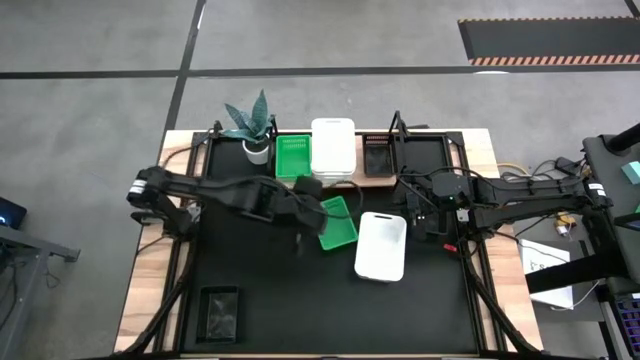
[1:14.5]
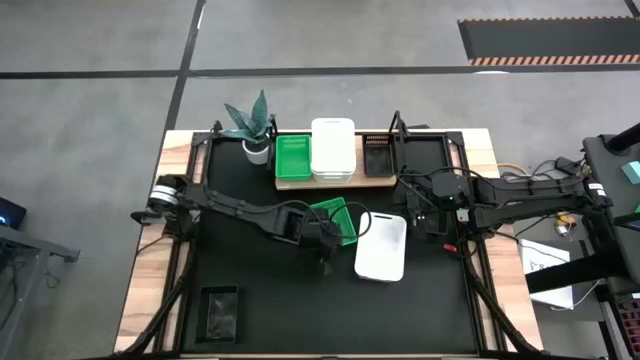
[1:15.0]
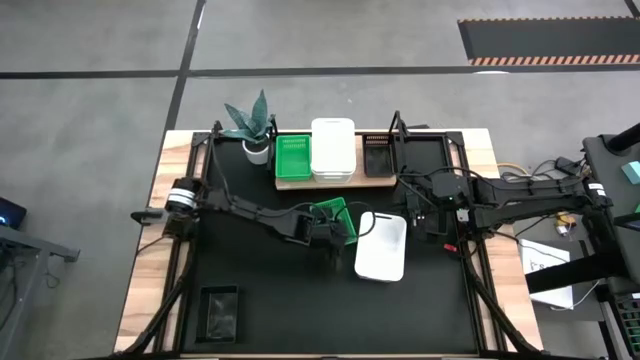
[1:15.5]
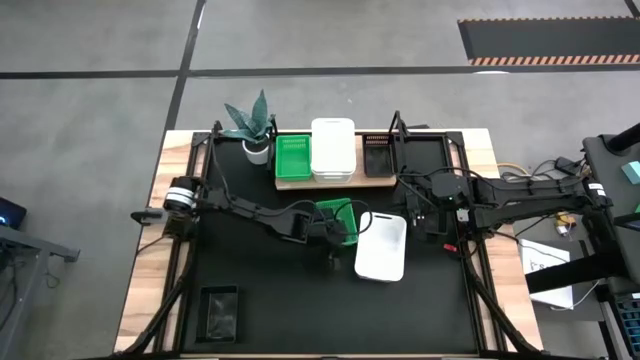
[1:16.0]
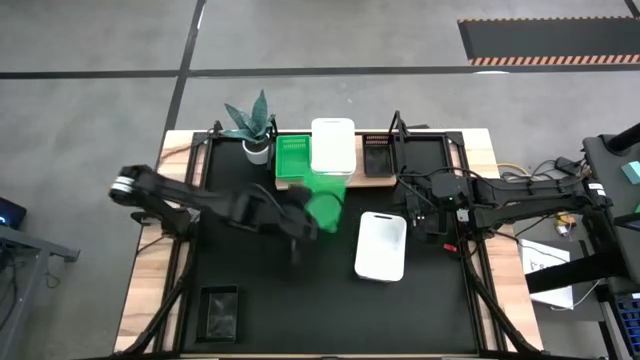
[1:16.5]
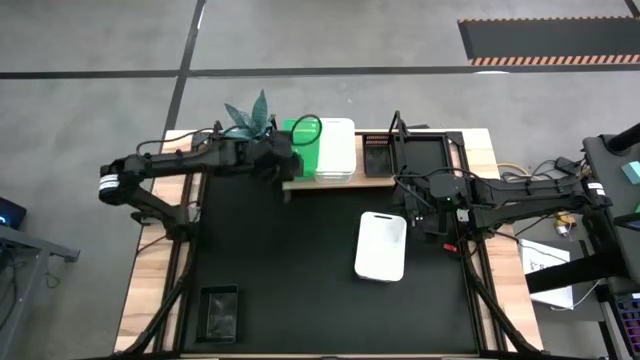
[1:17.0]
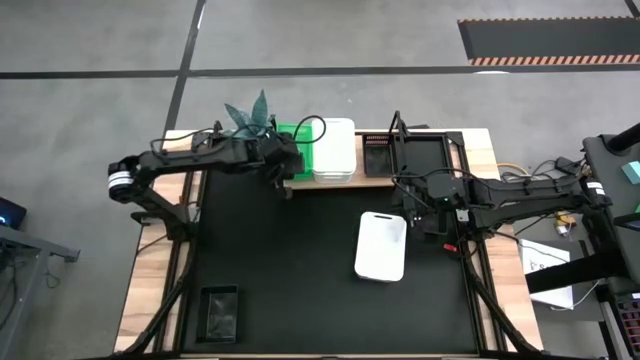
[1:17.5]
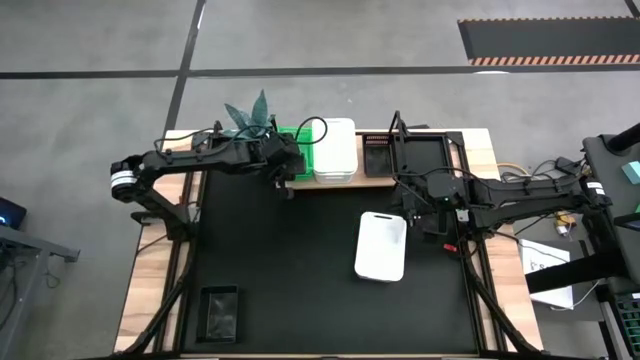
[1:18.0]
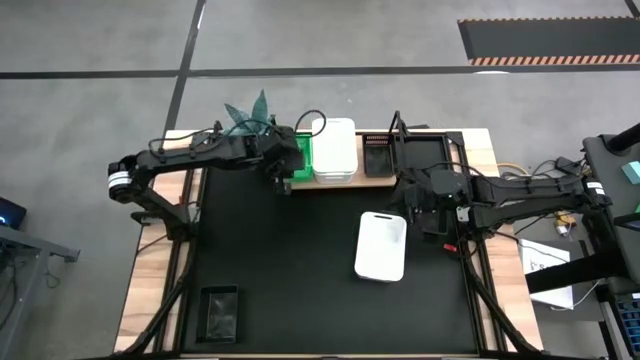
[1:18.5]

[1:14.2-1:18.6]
Task: Stack baskets on shelf by color
Stack the green bin into the green bins on the shelf

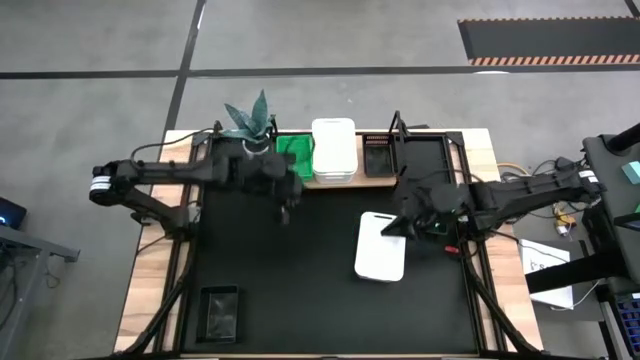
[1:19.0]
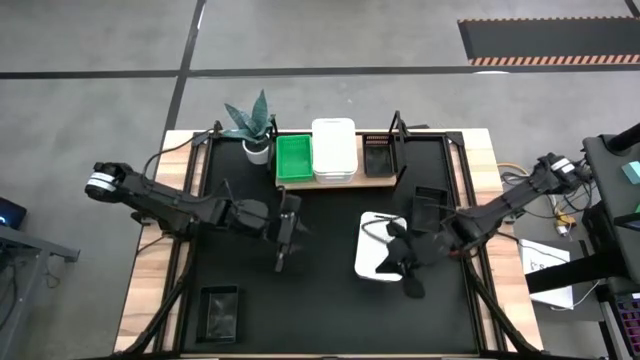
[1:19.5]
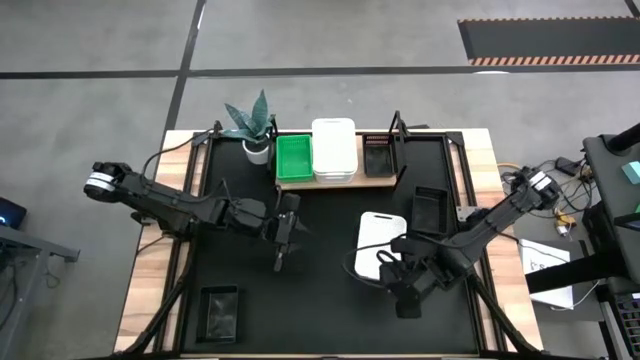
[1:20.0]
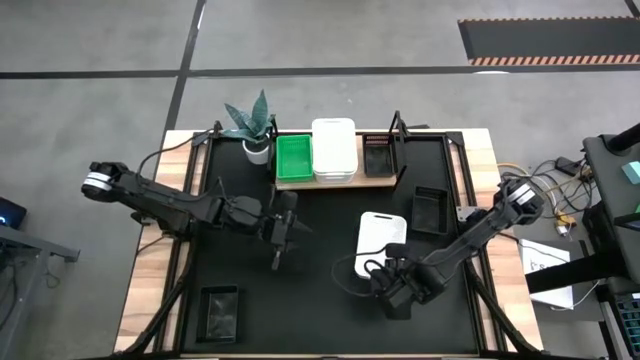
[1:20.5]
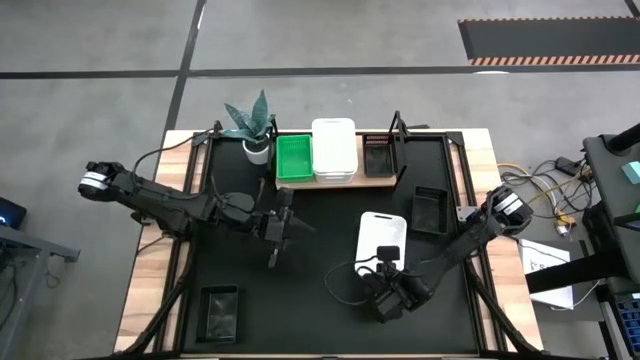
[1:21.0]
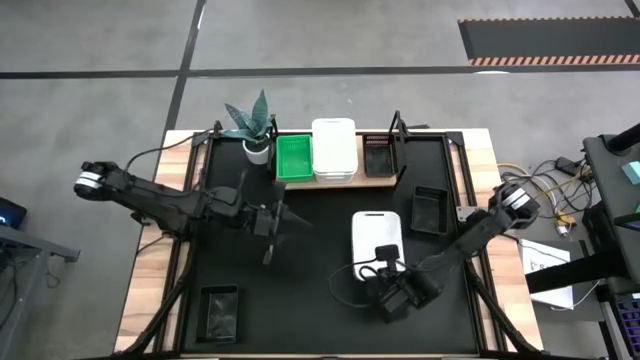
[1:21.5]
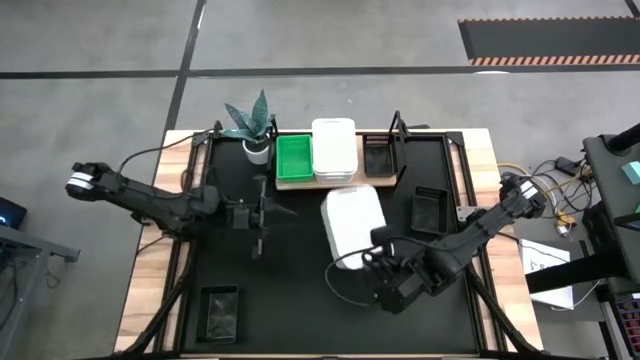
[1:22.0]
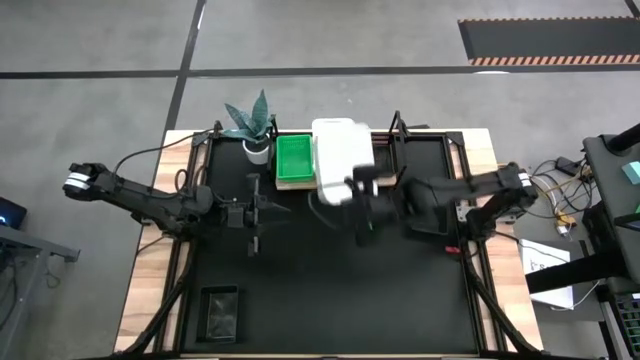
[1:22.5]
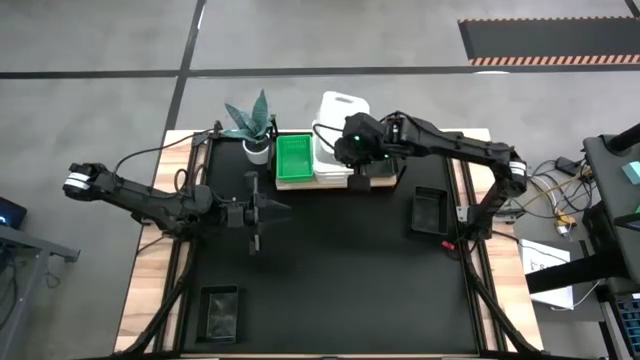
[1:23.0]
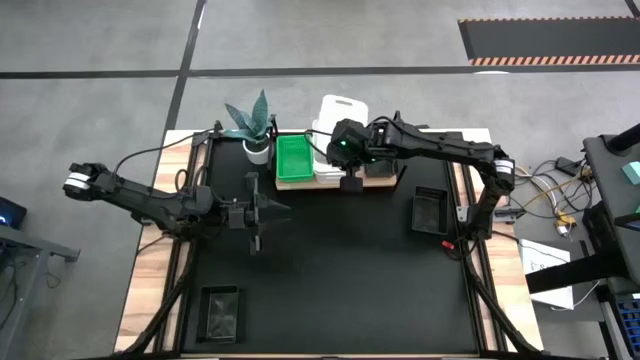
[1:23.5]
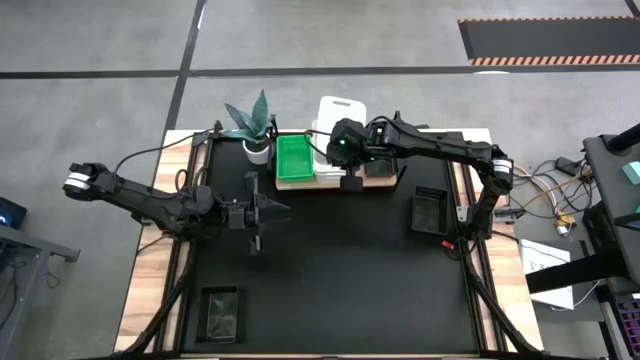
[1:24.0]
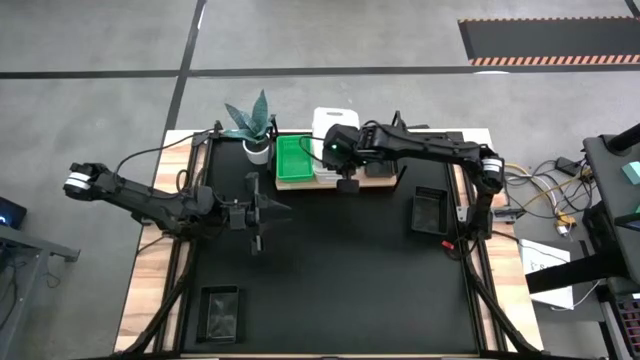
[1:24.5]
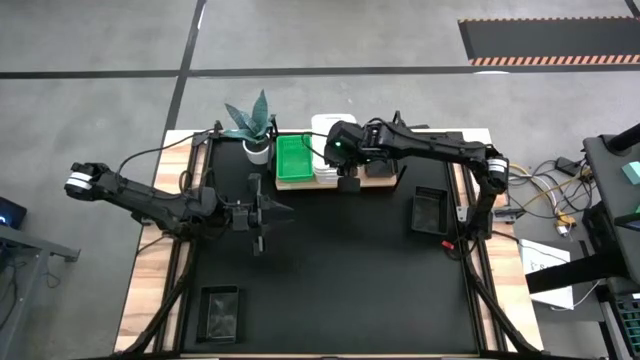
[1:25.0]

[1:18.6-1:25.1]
Stack the white bin into the white bins on the shelf

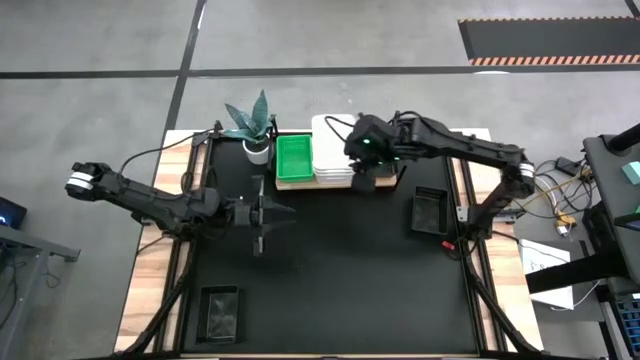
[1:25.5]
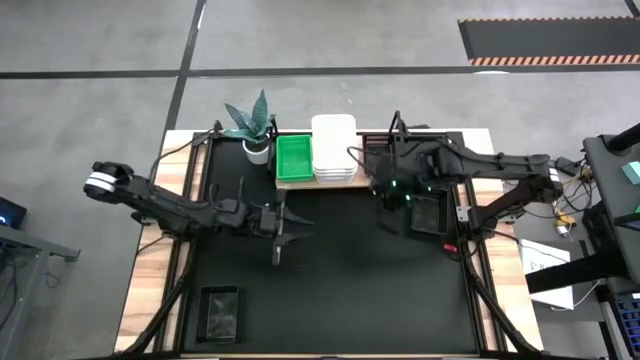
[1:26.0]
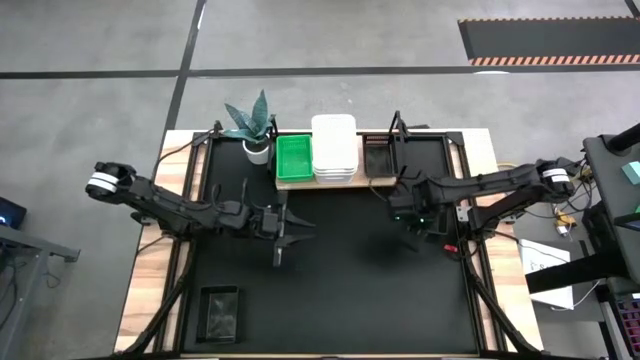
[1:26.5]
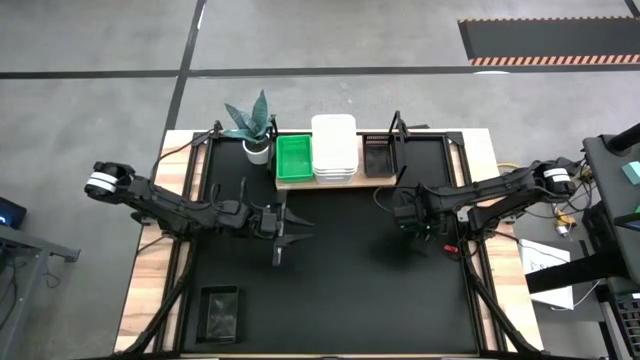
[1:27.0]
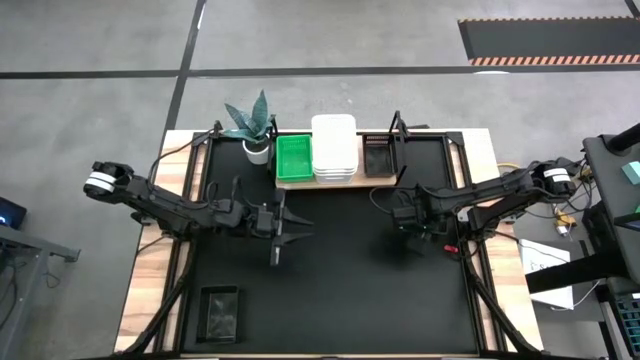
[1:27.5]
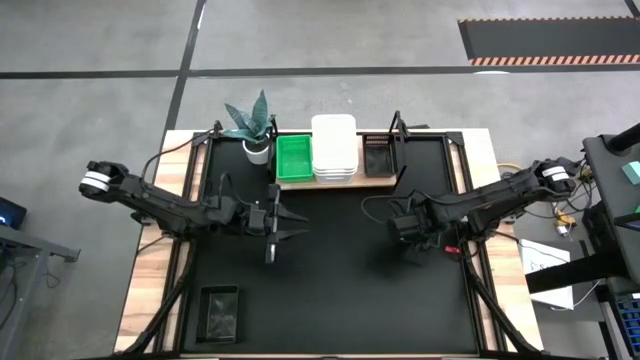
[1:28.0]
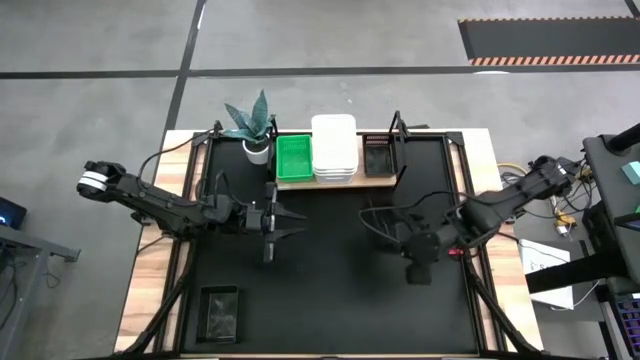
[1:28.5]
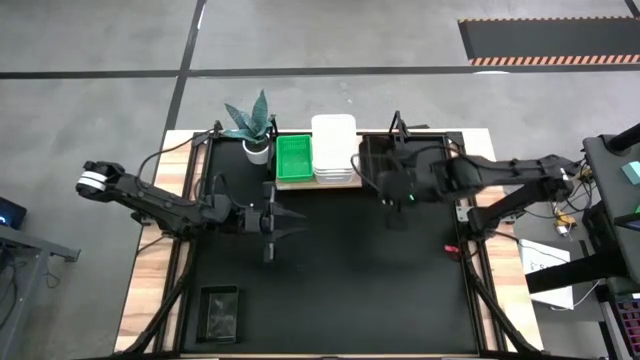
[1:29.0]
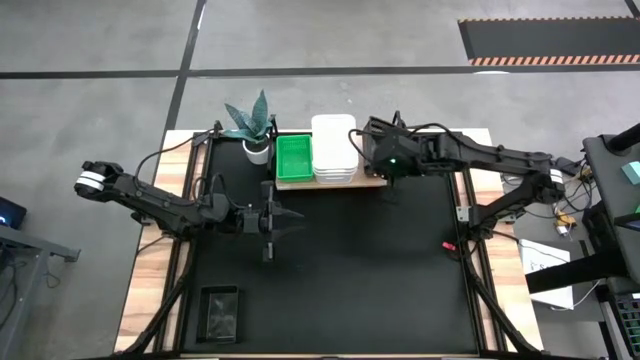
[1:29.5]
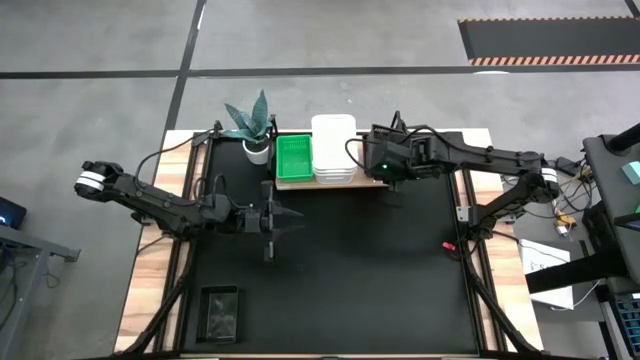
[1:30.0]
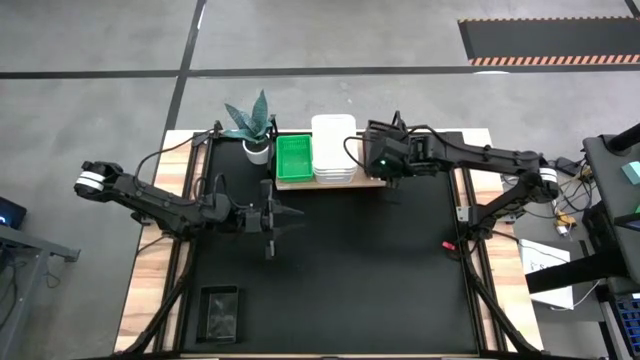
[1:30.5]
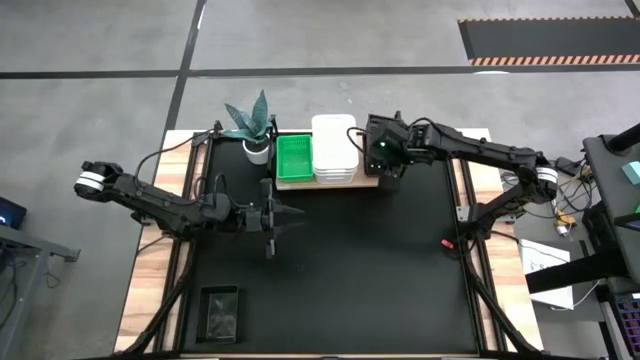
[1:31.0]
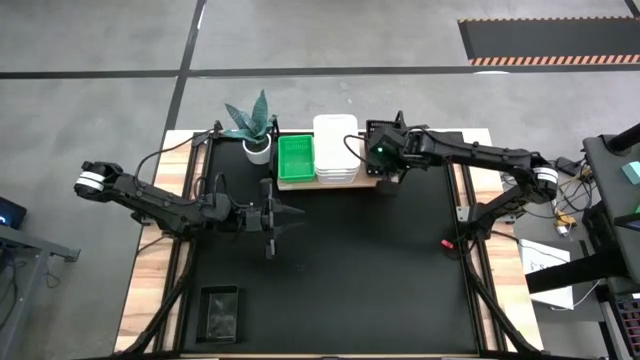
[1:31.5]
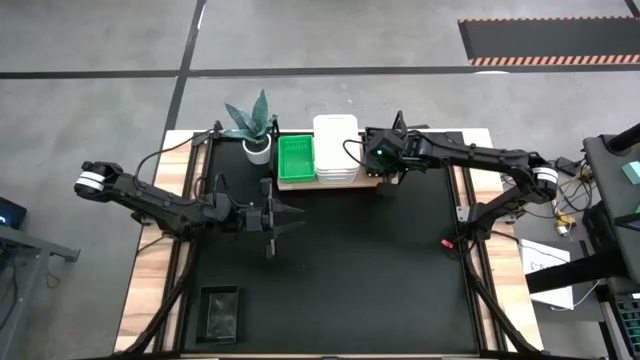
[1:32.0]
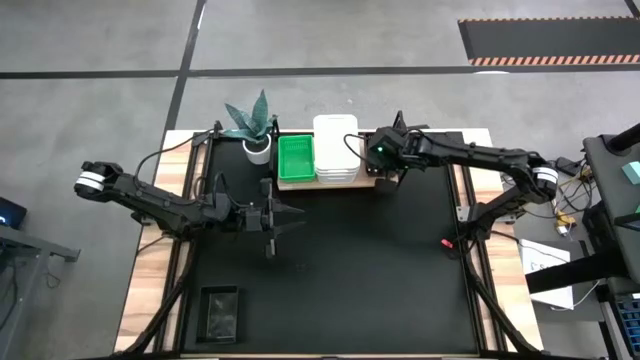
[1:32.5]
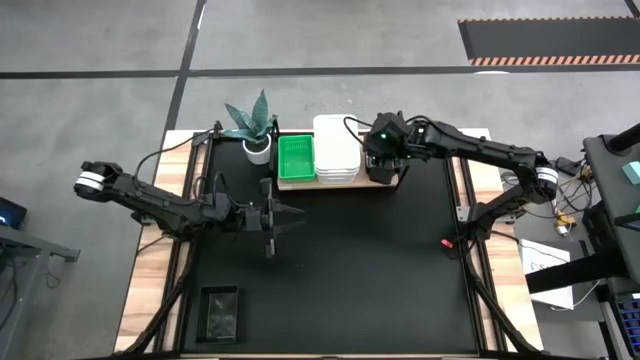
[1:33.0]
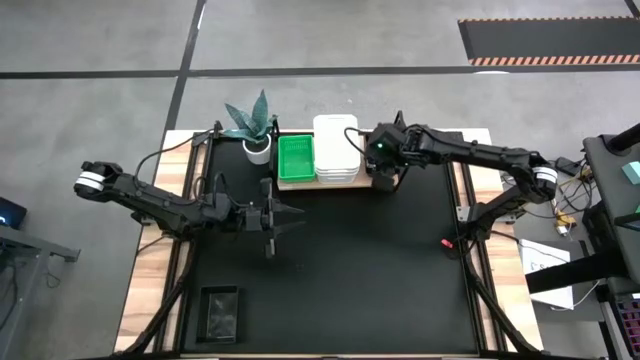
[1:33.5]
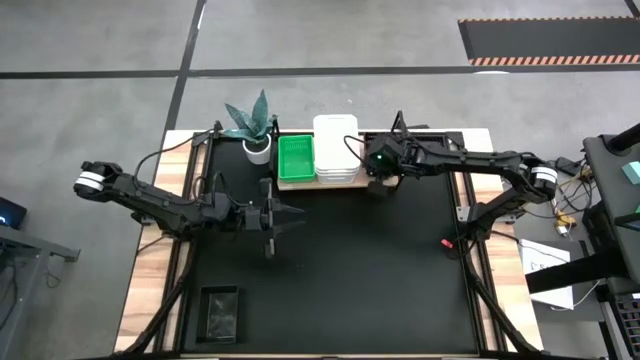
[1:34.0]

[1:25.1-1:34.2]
Stack the right black bin into the black bin on the shelf

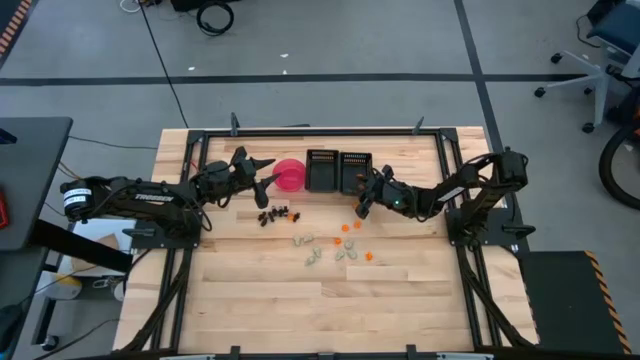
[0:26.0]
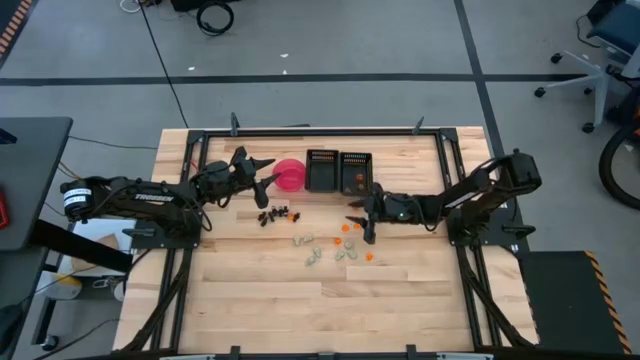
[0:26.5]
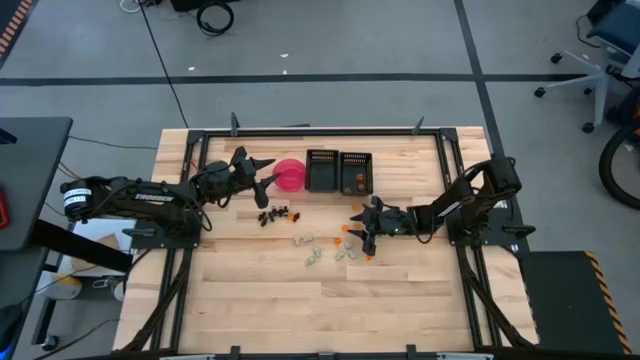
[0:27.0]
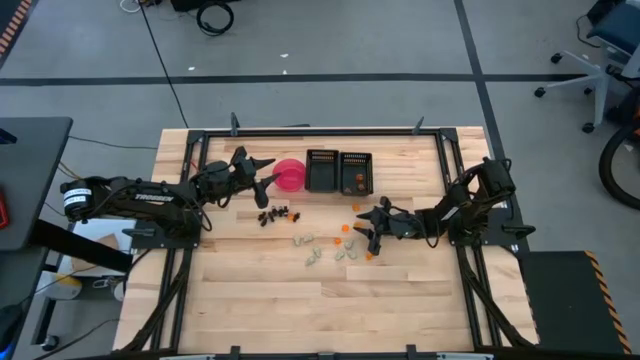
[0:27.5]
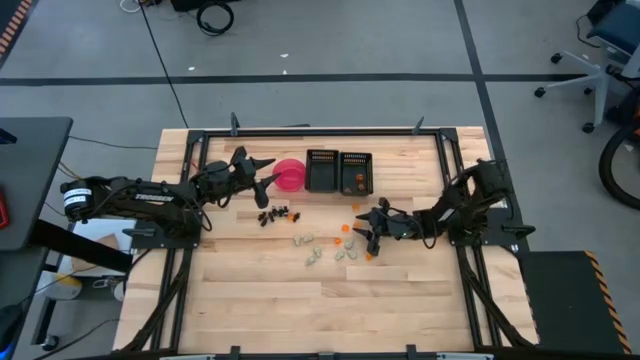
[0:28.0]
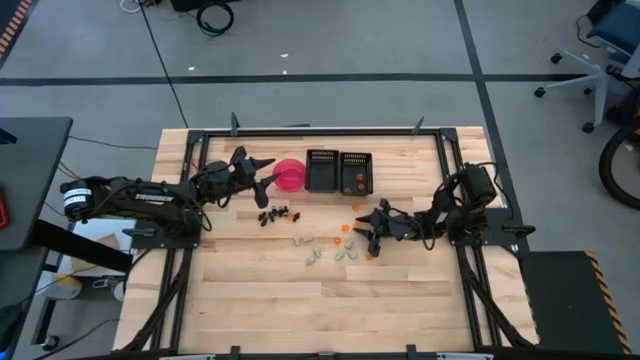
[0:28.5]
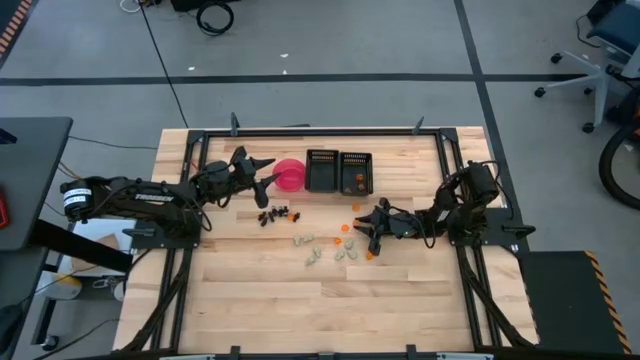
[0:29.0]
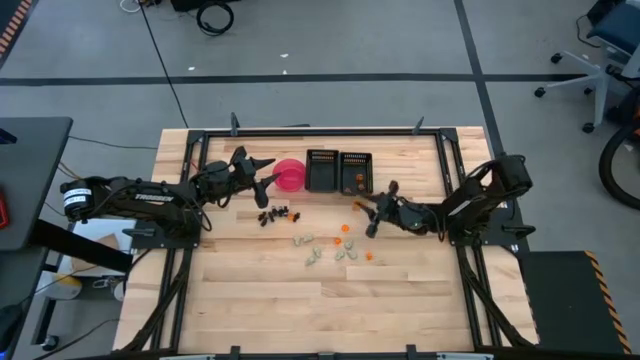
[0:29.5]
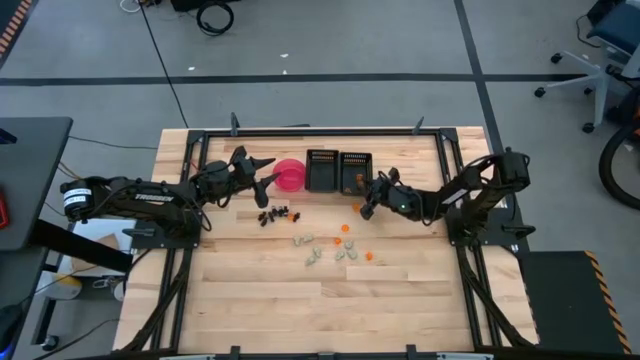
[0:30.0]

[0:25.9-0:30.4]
Task: Sort Halloween decoration
Put the orange pumpkin toy into the right black bin
